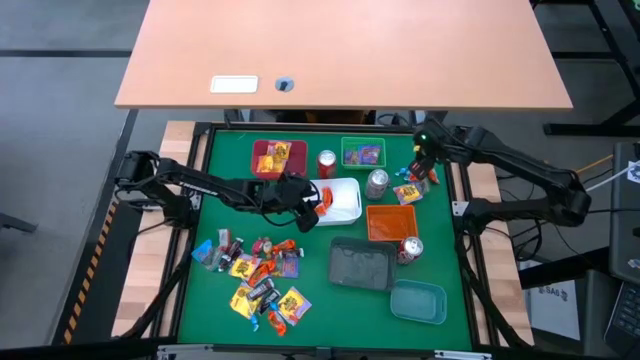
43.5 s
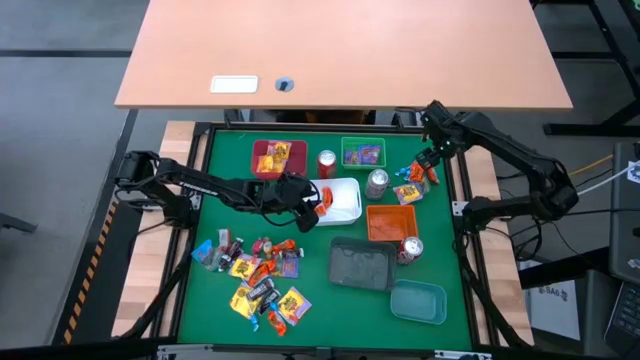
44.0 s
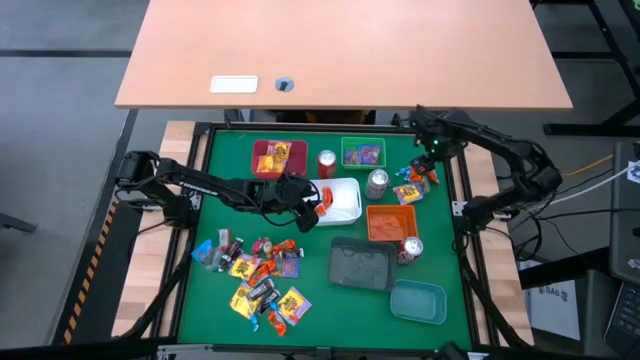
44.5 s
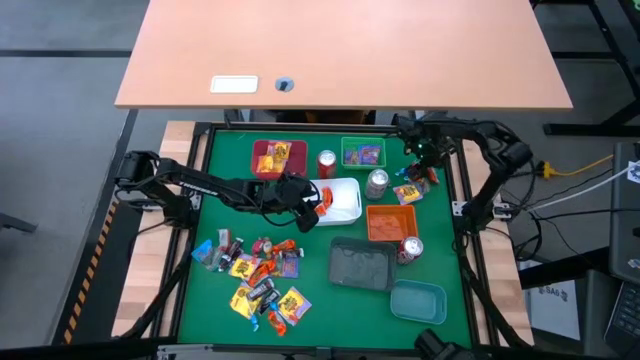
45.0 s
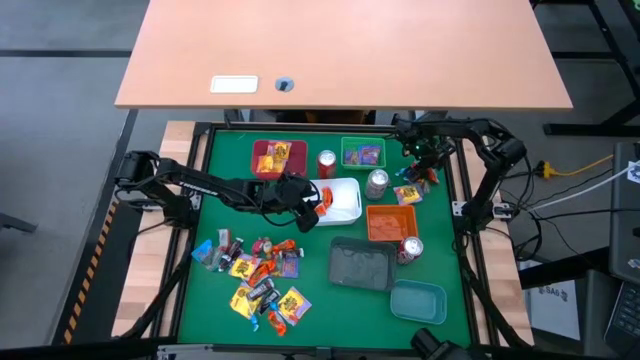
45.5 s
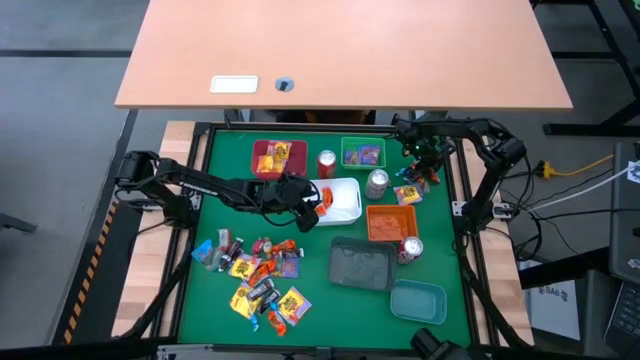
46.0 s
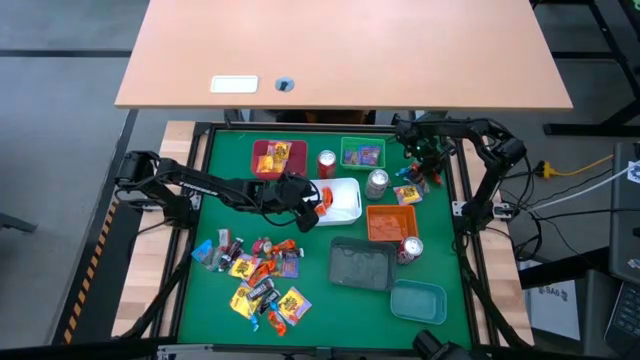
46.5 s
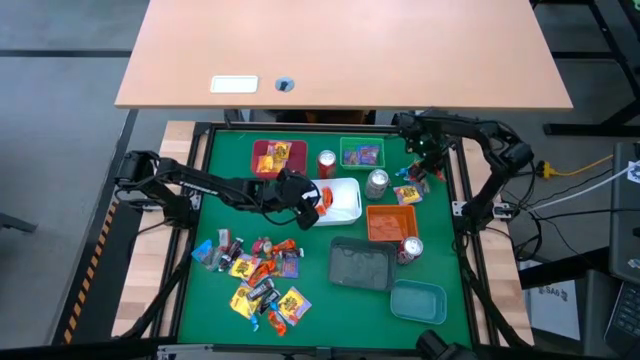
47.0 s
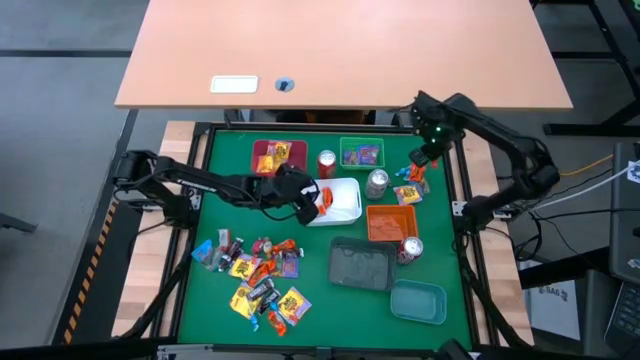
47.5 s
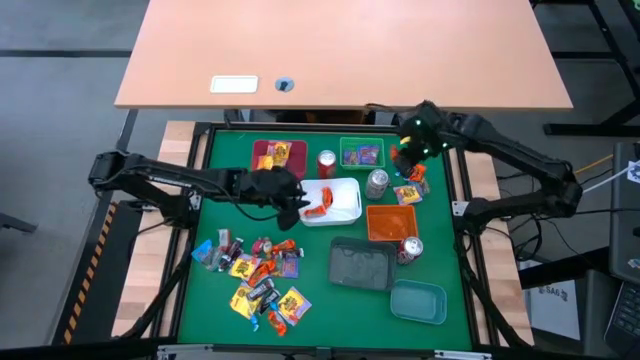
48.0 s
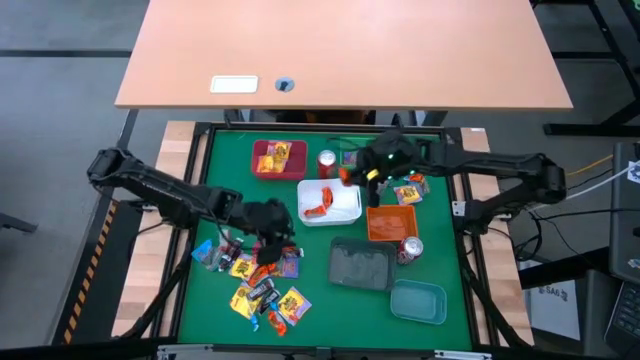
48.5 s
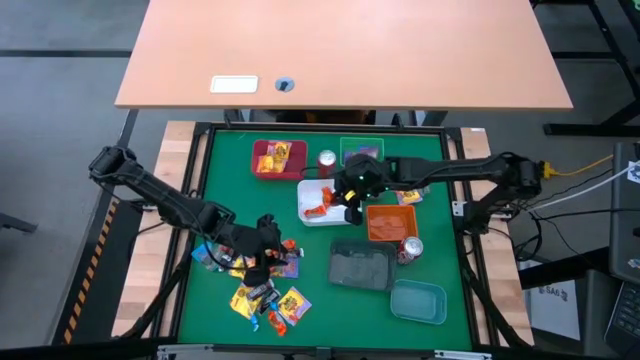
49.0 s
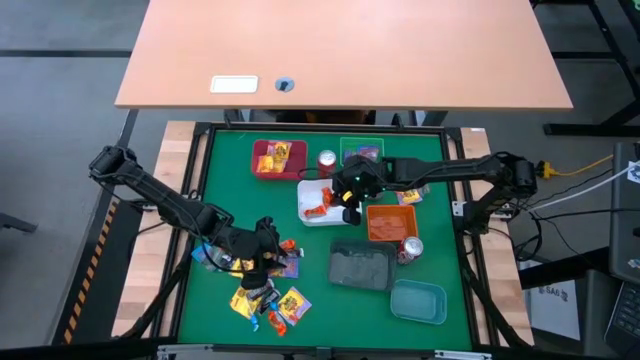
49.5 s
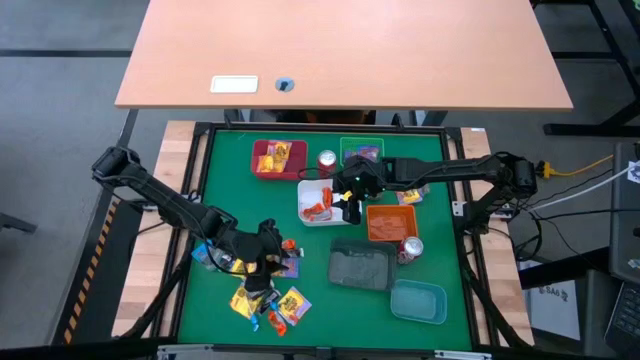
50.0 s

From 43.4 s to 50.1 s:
Task: Sort candy
Put the orange candy into the white bin

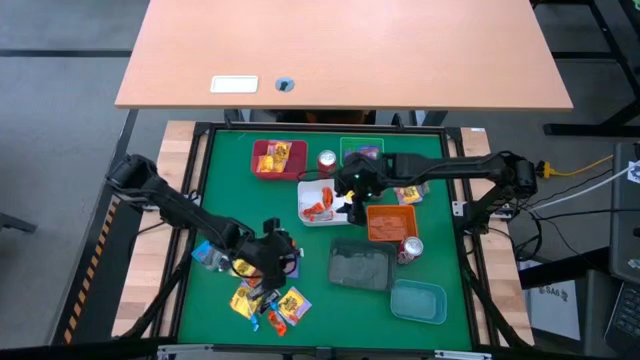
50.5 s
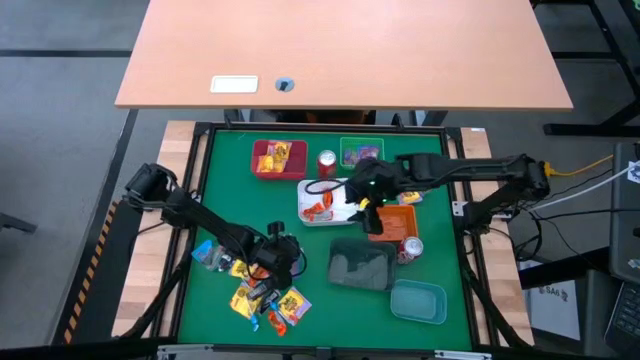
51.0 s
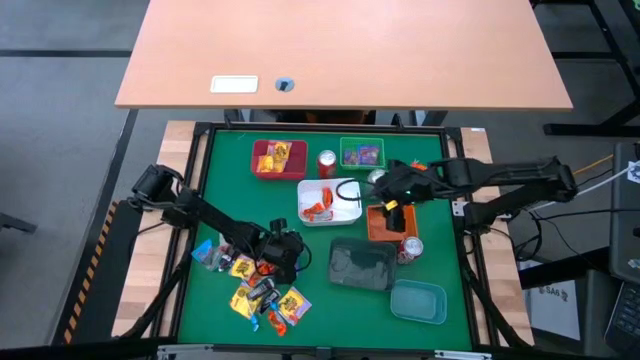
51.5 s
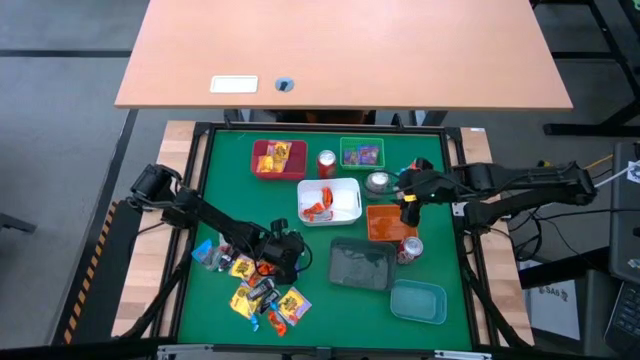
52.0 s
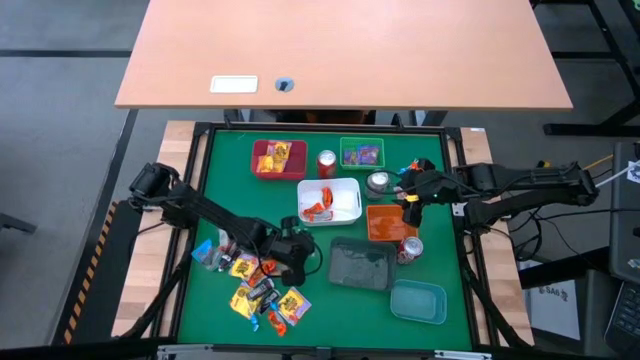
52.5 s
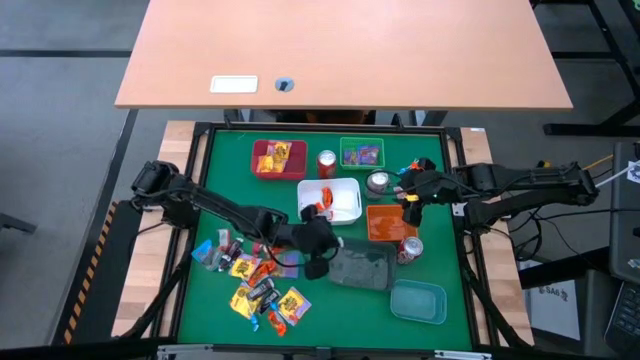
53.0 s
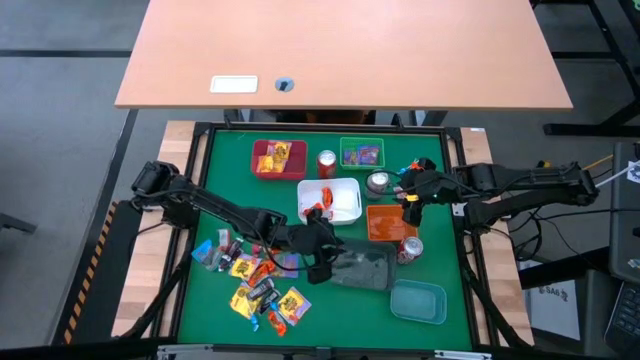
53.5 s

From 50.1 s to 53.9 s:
Put the brown candy into the black bin

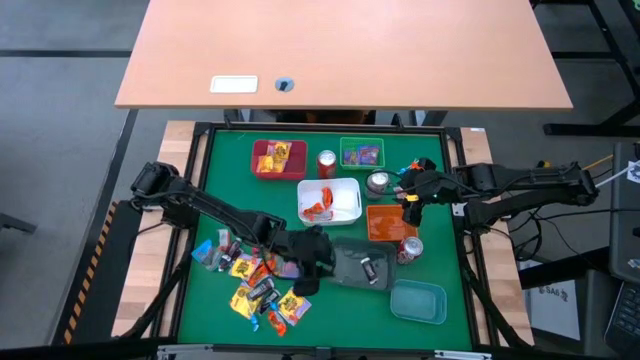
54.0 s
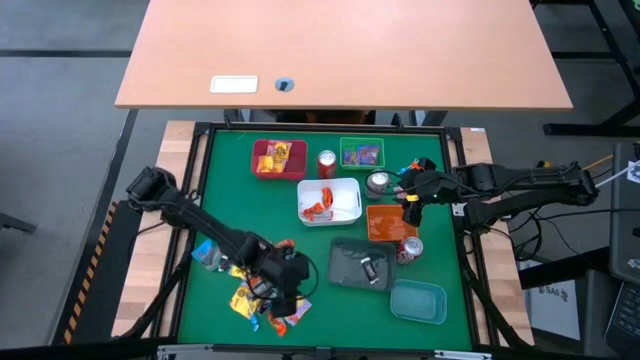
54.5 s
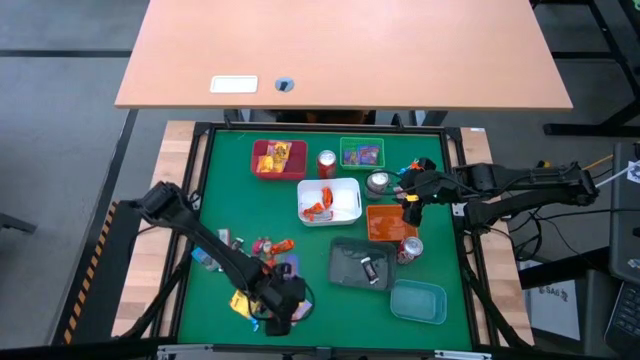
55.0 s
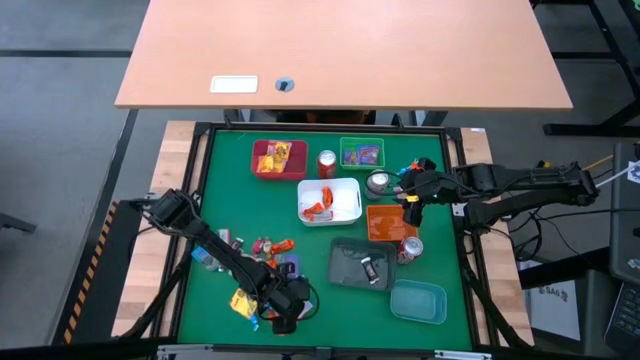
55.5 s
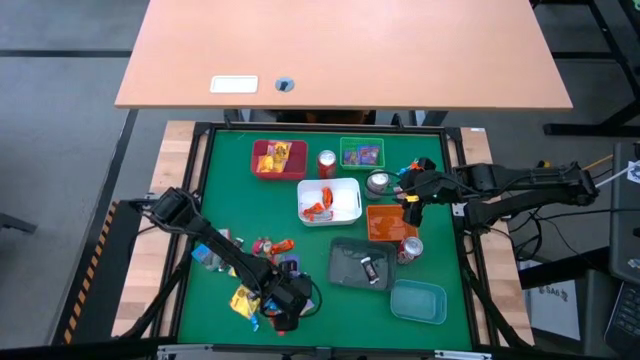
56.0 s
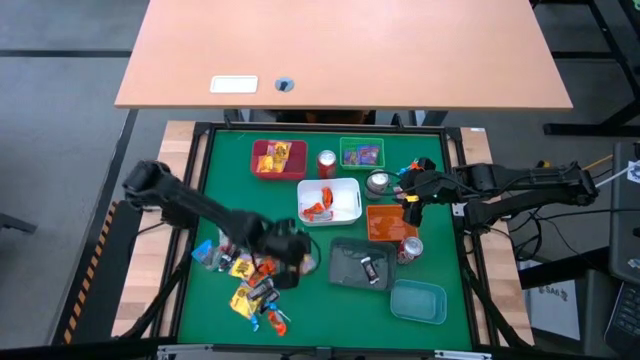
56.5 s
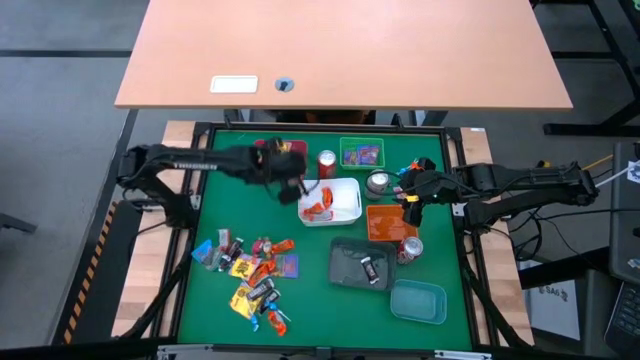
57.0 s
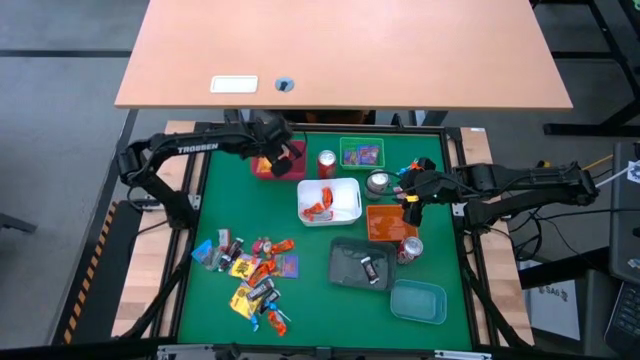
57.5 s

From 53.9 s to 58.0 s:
Put the yellow candy into the red bin

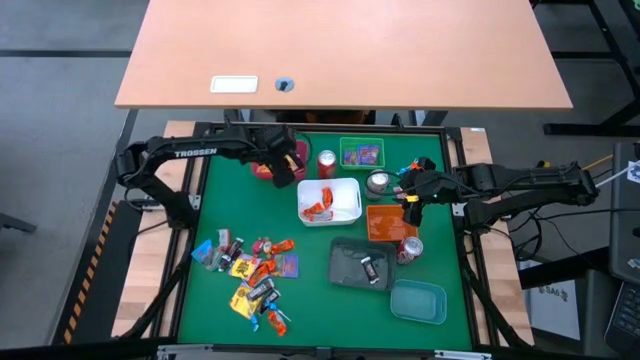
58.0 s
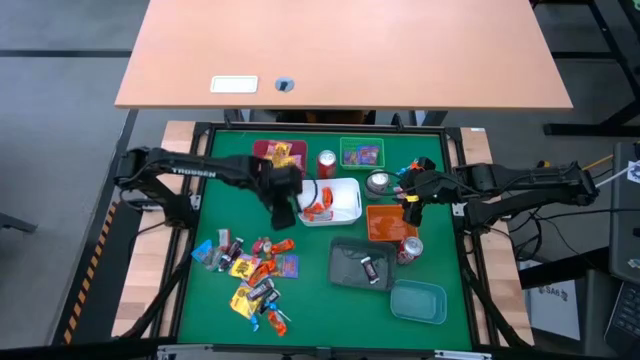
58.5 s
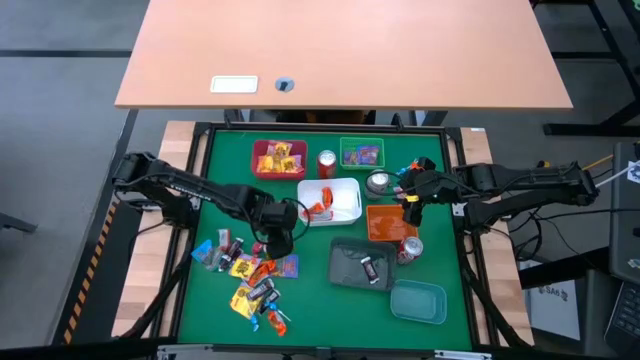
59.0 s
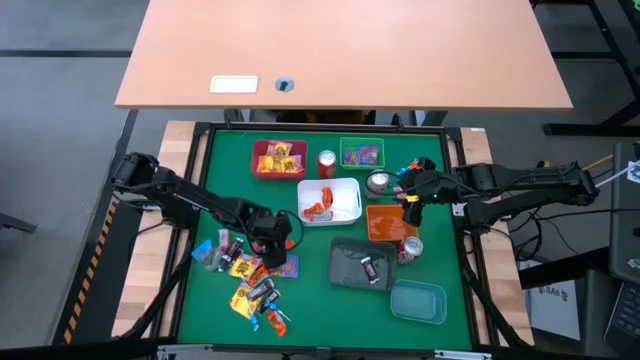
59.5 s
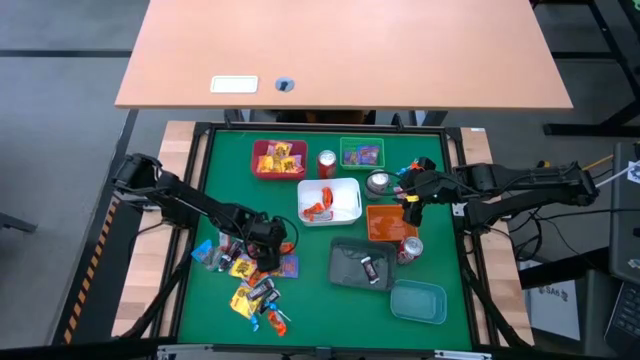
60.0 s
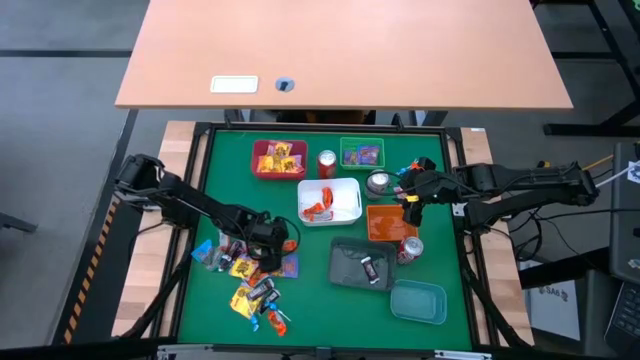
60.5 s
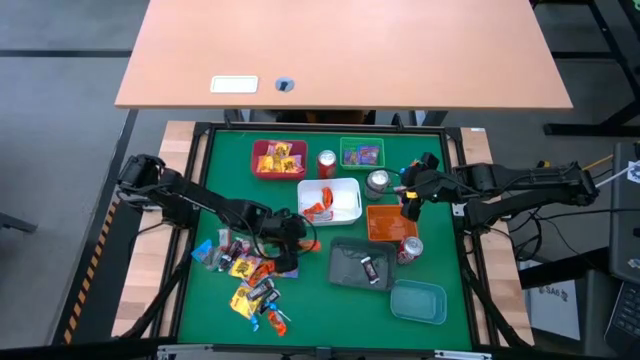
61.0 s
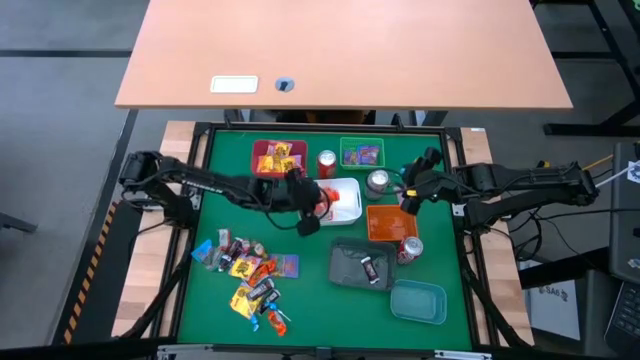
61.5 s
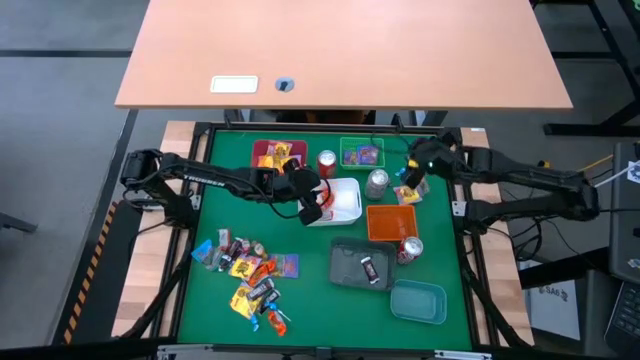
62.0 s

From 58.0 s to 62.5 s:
Put the orange candy into the white bin

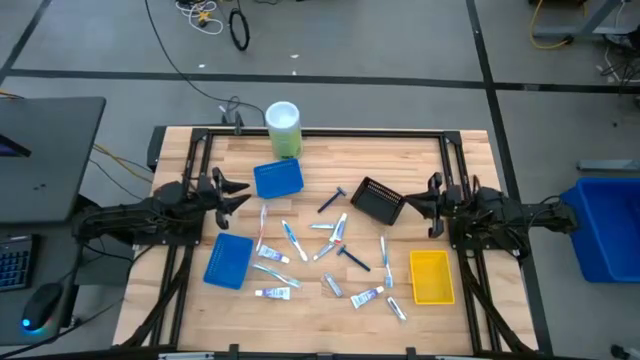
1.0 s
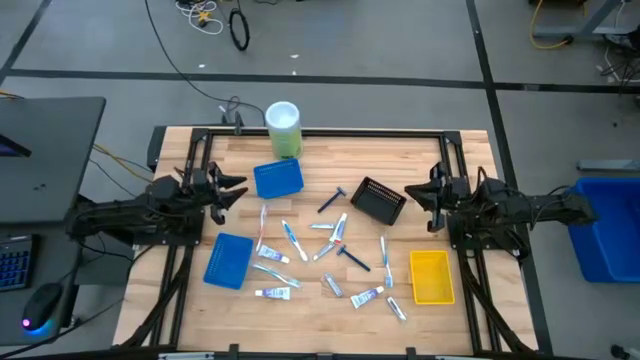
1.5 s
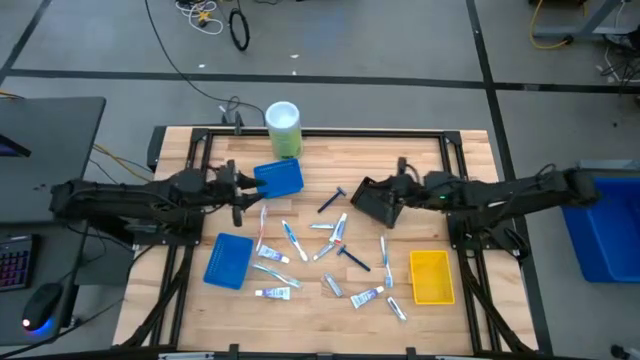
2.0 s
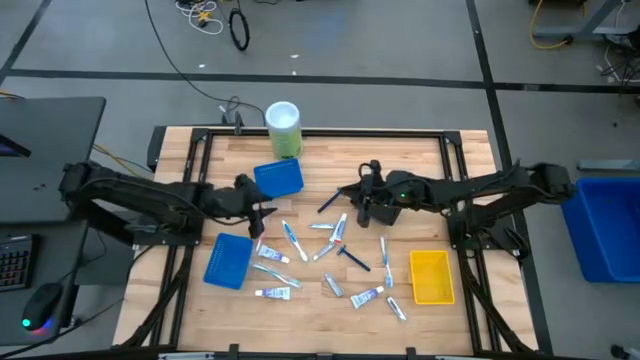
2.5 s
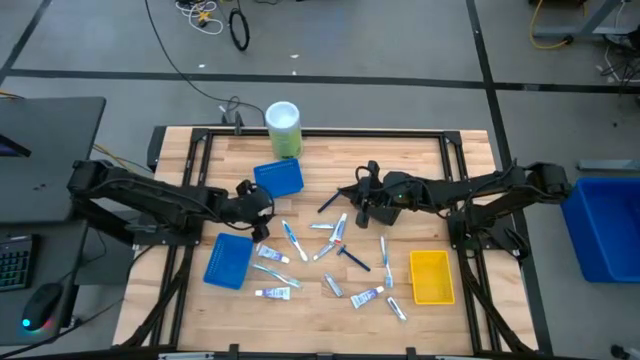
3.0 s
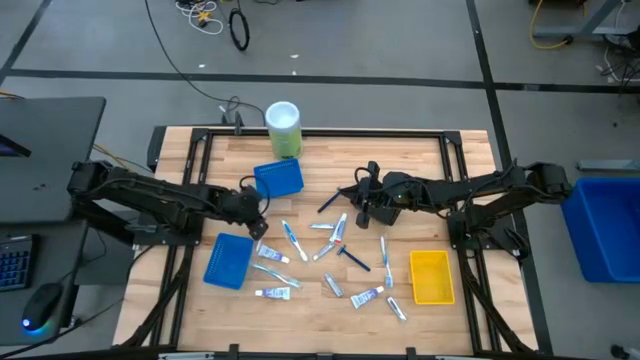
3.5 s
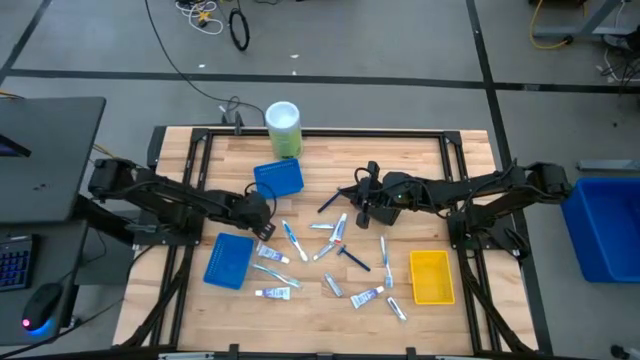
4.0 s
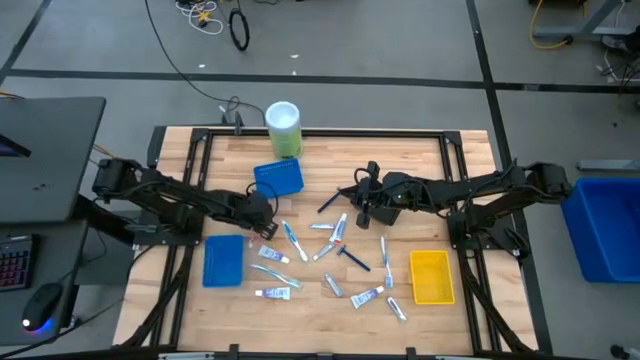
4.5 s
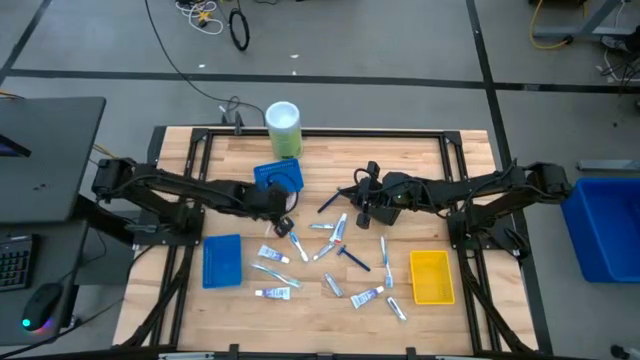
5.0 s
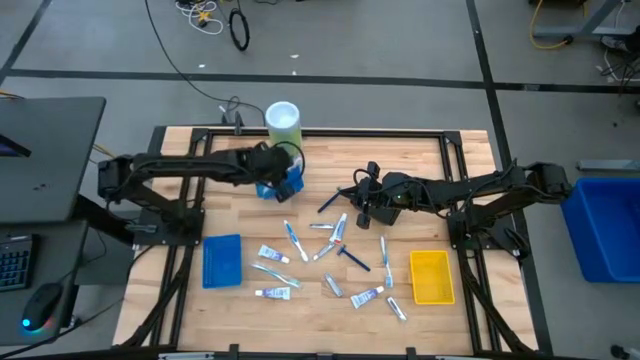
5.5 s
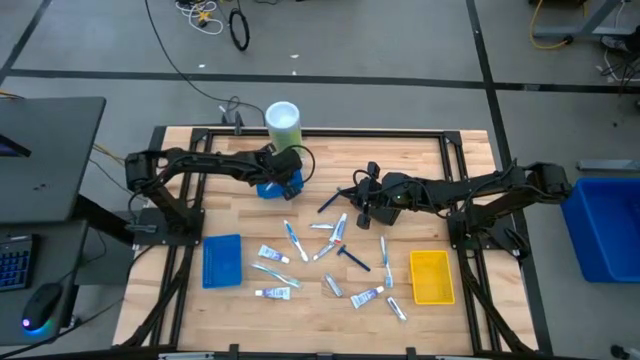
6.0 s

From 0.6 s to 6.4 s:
Task: Pick & Place Travel size toiletries
Put the orange toothbrush into the top blue bin
